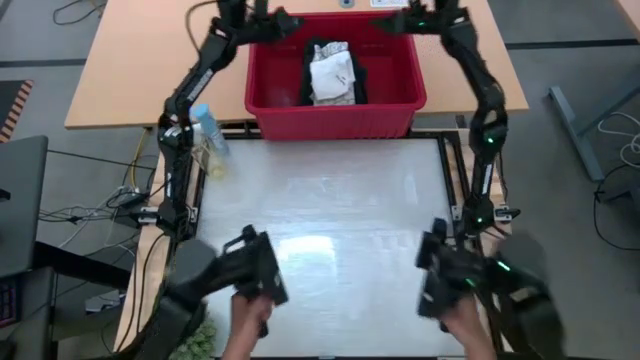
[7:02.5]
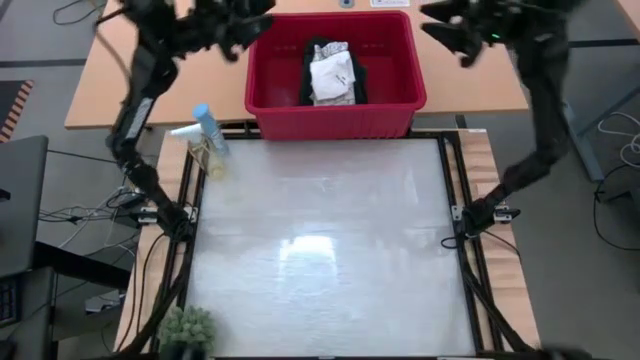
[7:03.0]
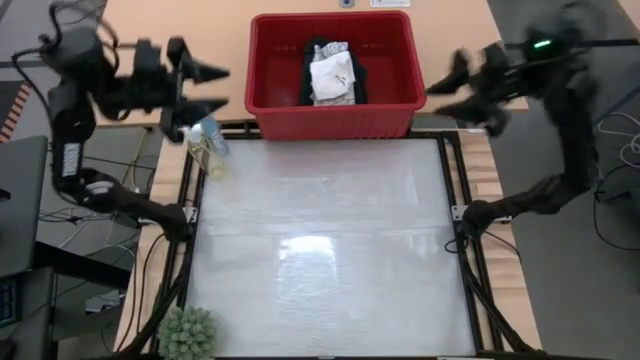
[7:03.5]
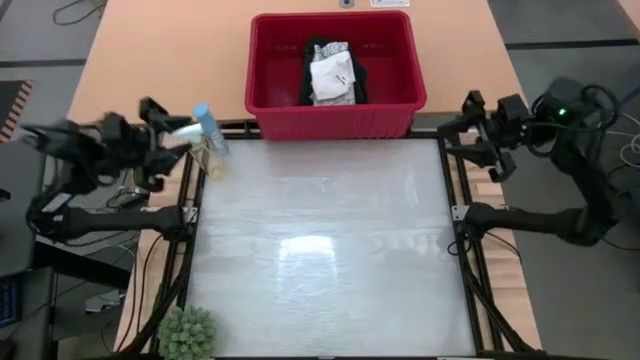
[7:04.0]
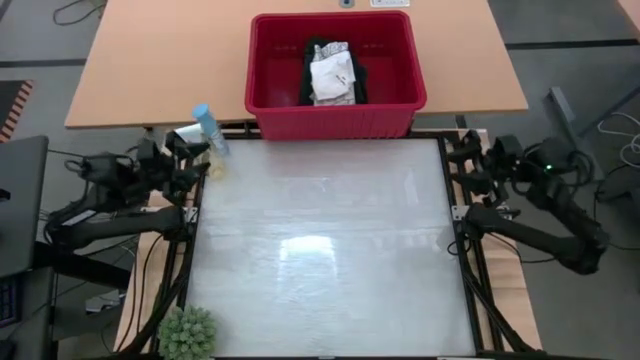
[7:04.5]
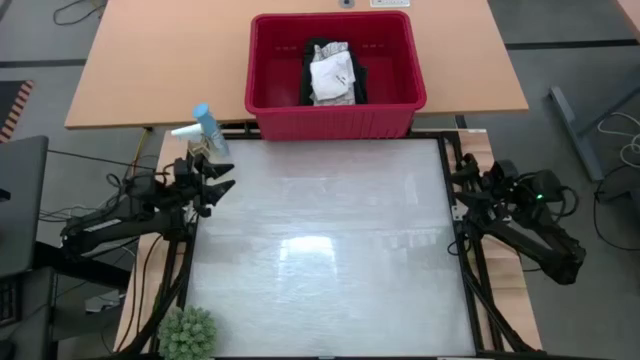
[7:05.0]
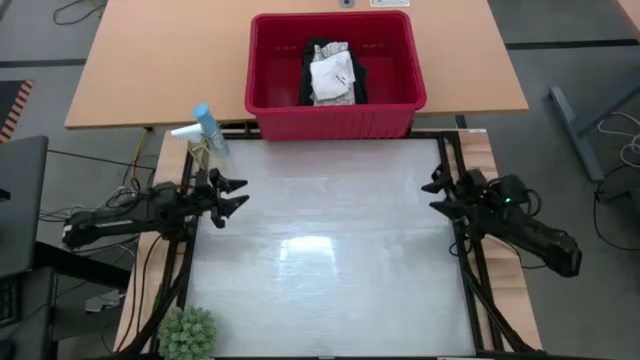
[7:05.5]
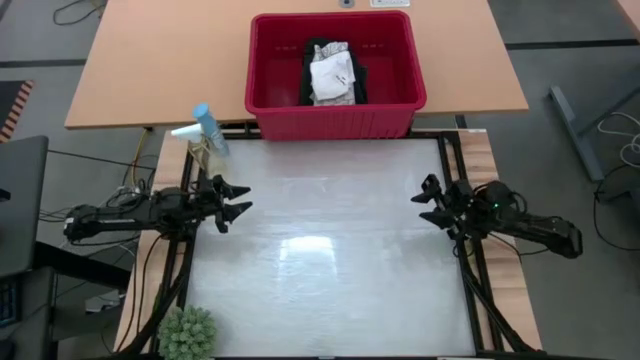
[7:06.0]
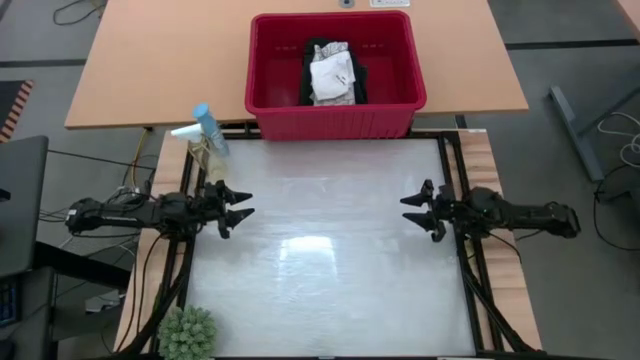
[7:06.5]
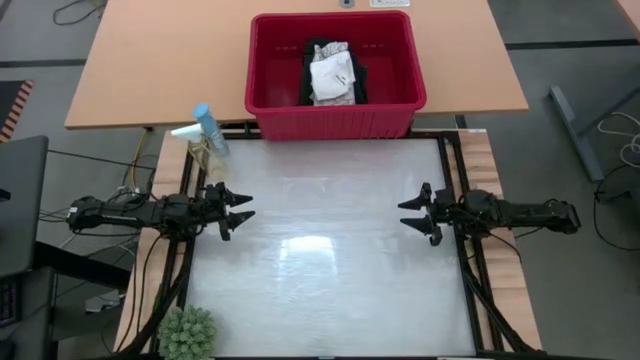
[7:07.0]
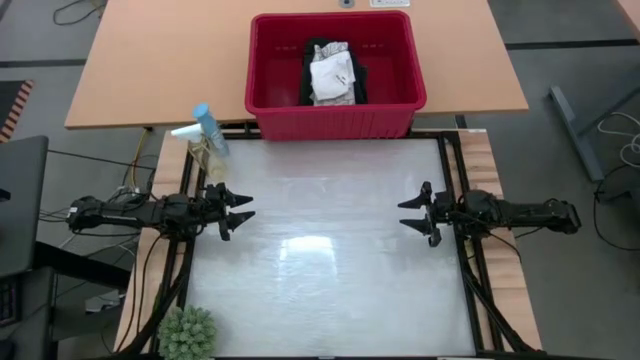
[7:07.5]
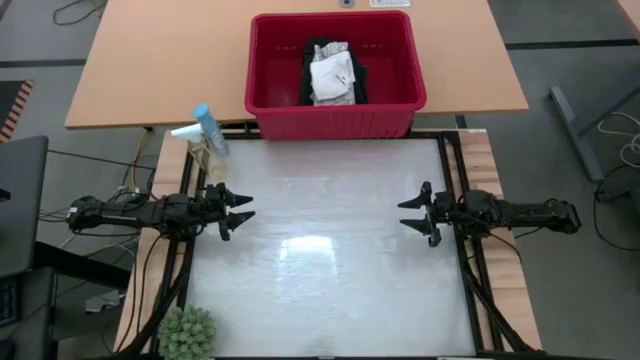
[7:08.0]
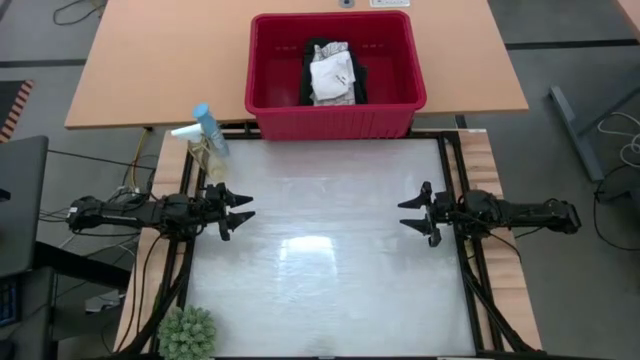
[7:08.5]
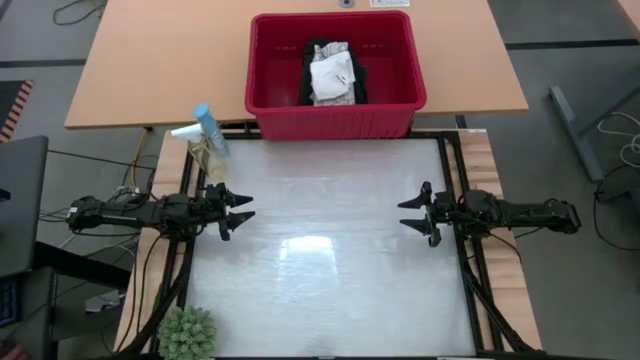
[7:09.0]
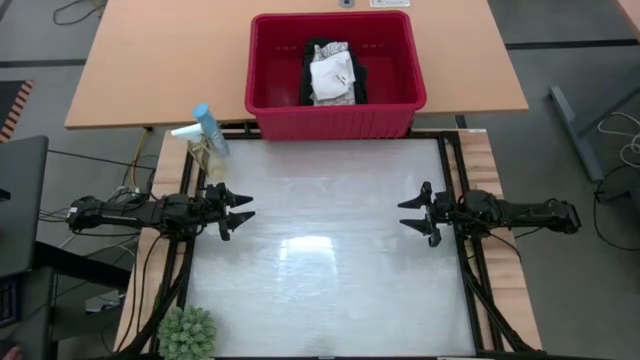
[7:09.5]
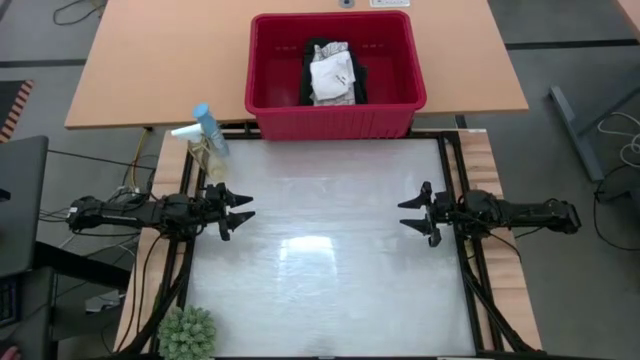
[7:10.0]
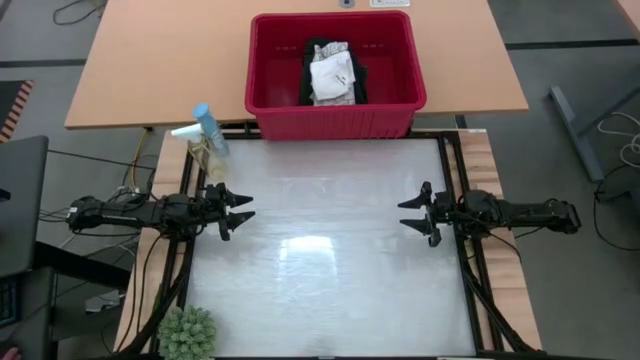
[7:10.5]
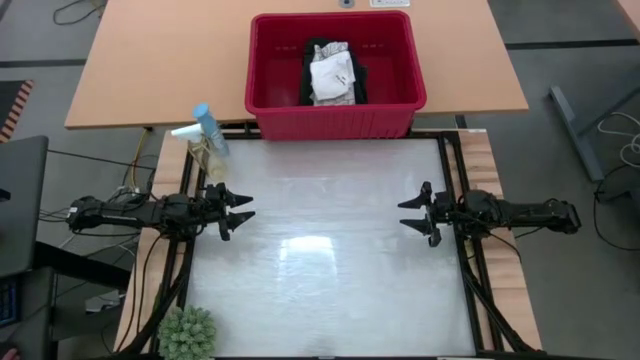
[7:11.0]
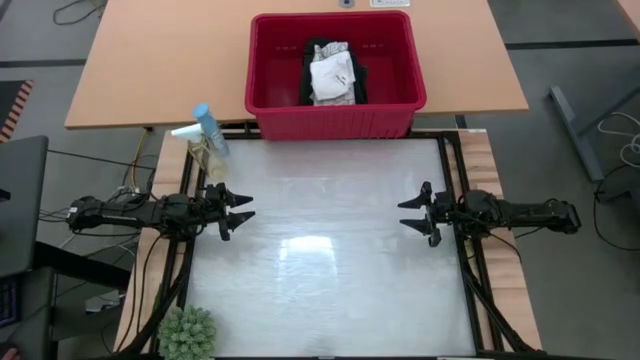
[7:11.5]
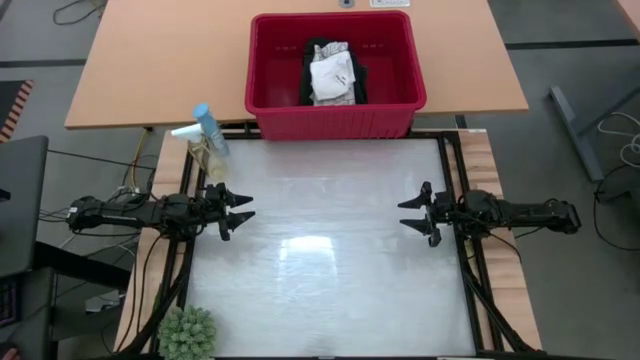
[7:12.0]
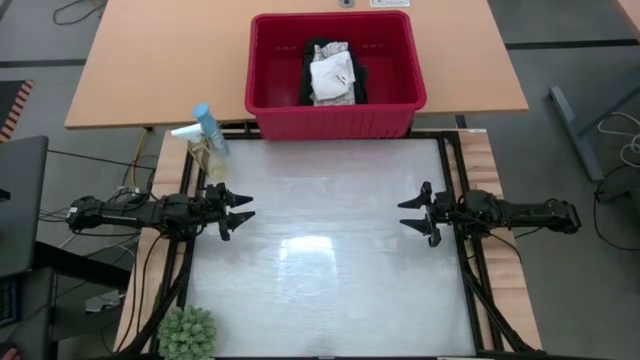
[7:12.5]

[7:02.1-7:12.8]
Task: Fold Laundry from Bin
Return to Home Position

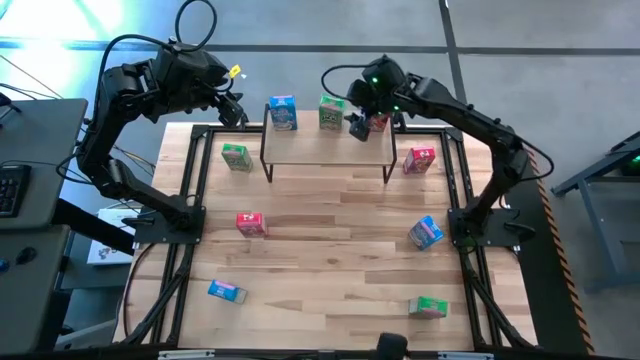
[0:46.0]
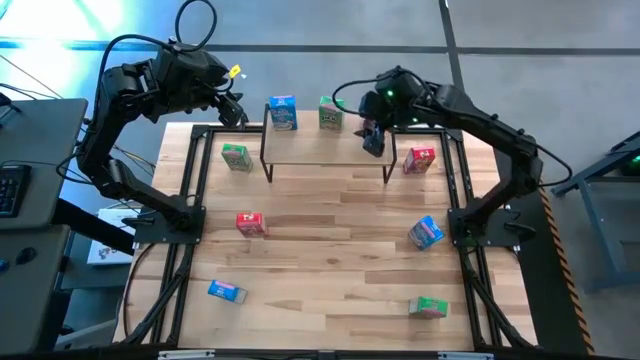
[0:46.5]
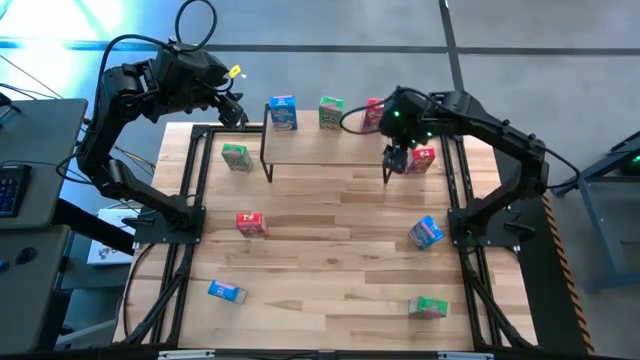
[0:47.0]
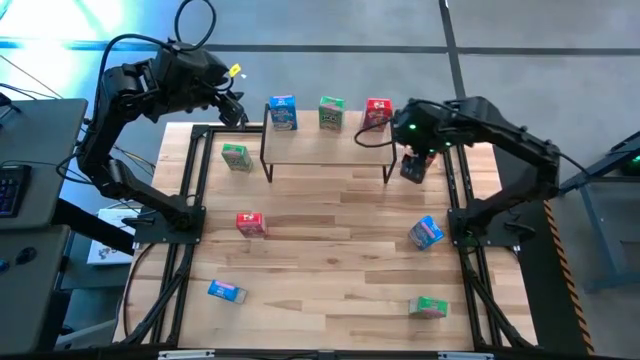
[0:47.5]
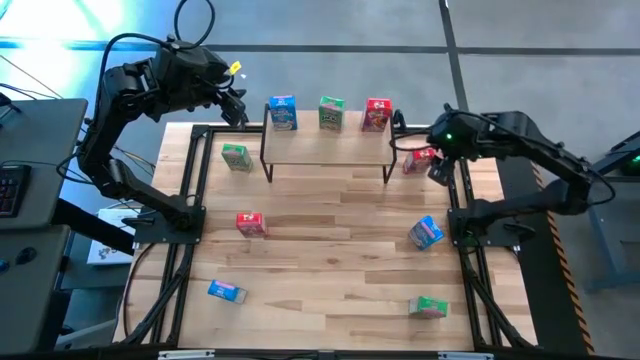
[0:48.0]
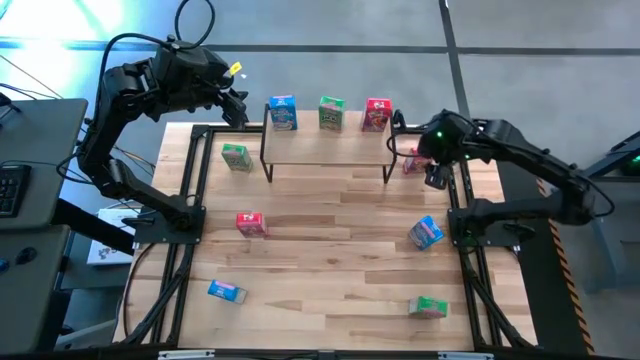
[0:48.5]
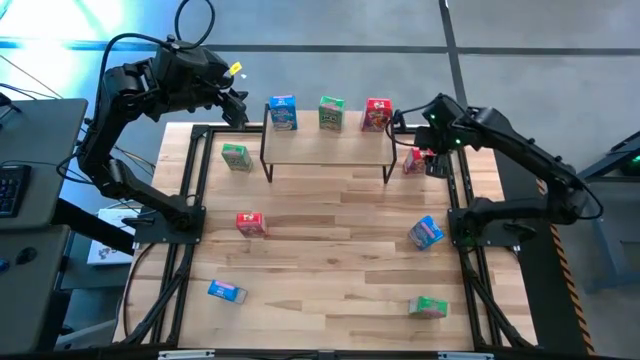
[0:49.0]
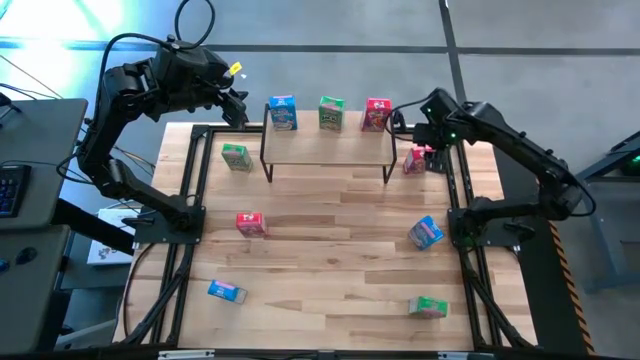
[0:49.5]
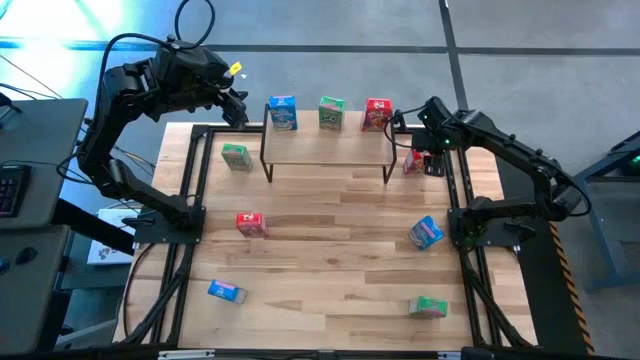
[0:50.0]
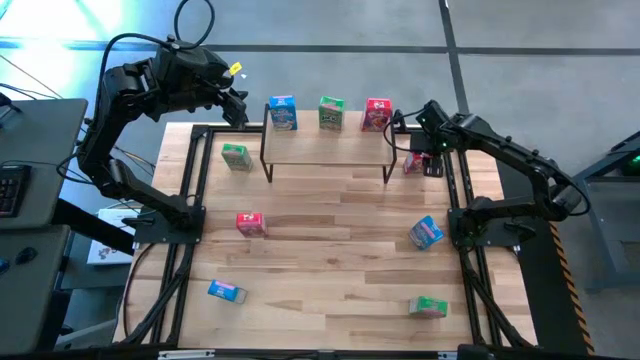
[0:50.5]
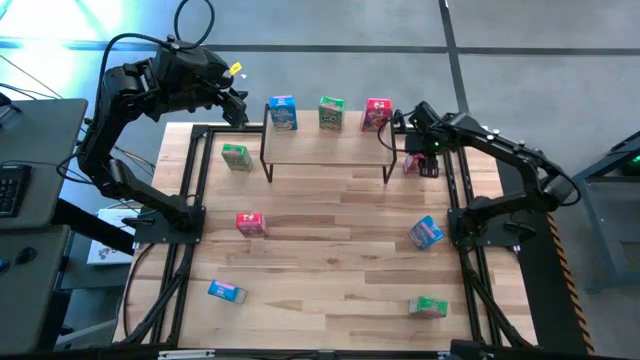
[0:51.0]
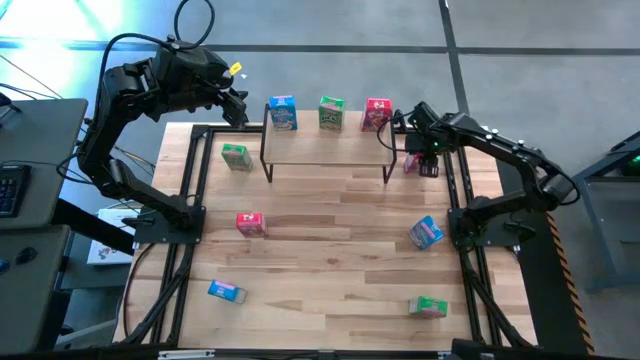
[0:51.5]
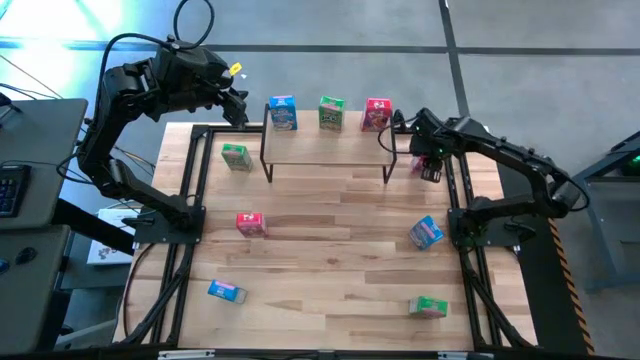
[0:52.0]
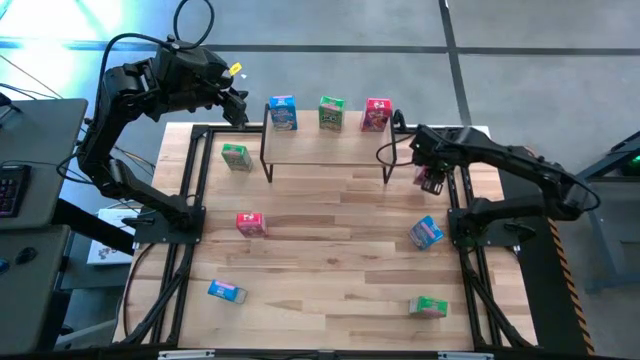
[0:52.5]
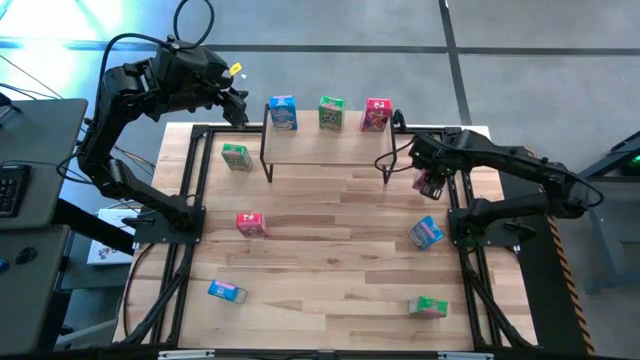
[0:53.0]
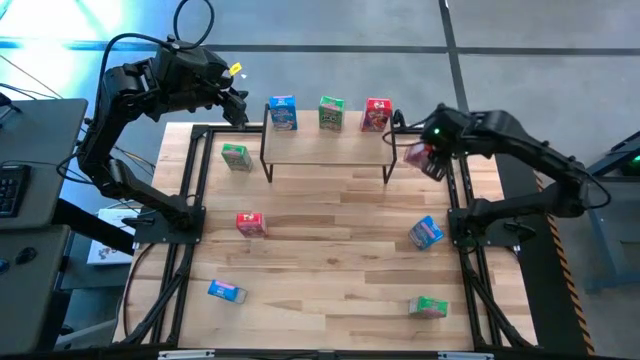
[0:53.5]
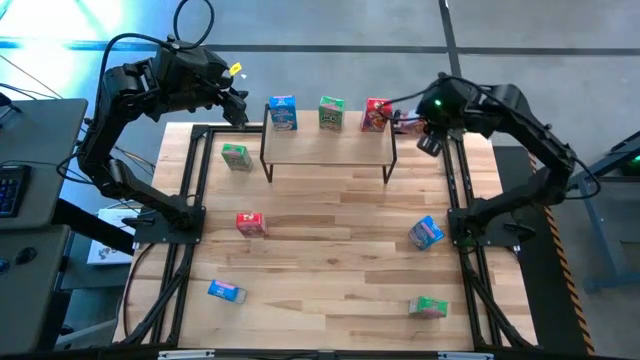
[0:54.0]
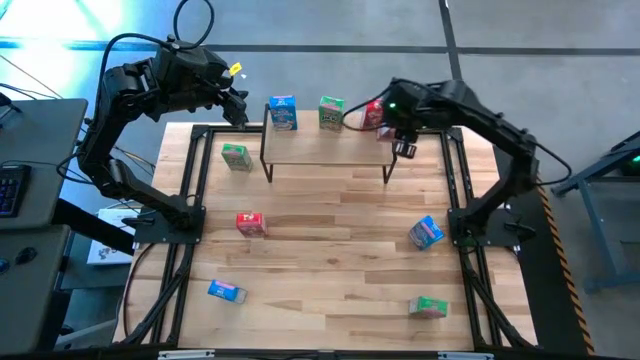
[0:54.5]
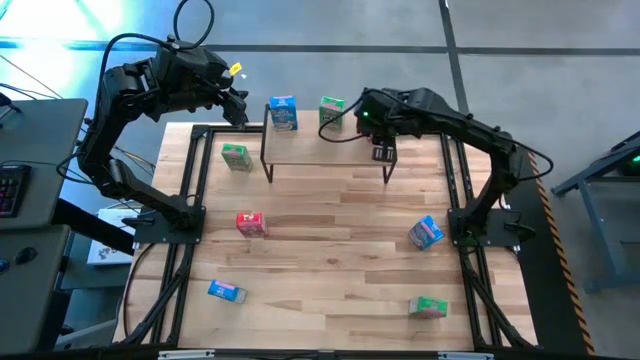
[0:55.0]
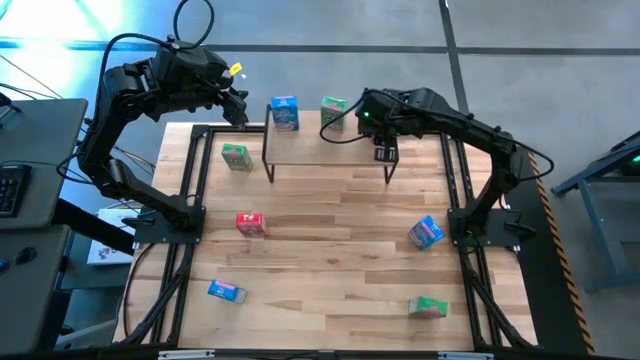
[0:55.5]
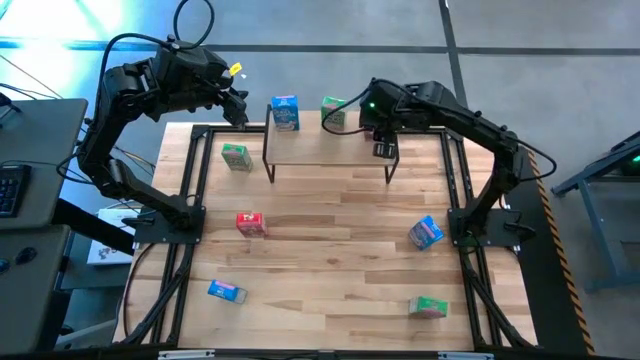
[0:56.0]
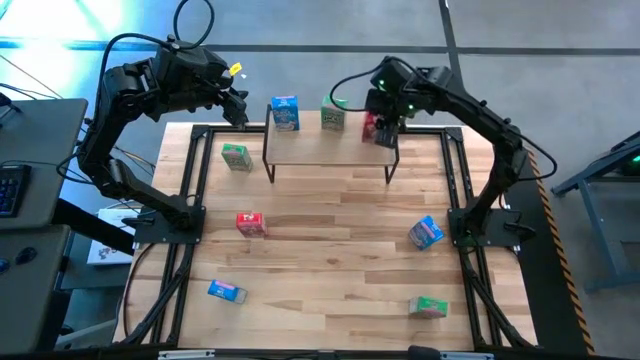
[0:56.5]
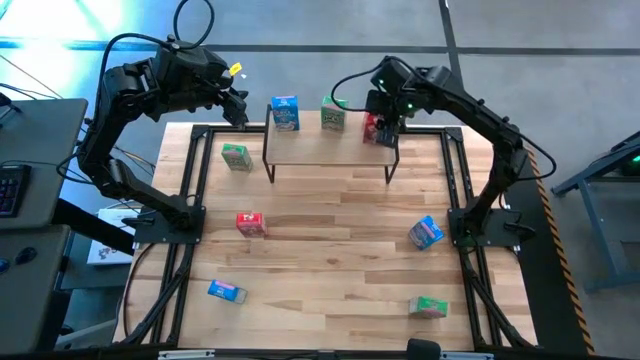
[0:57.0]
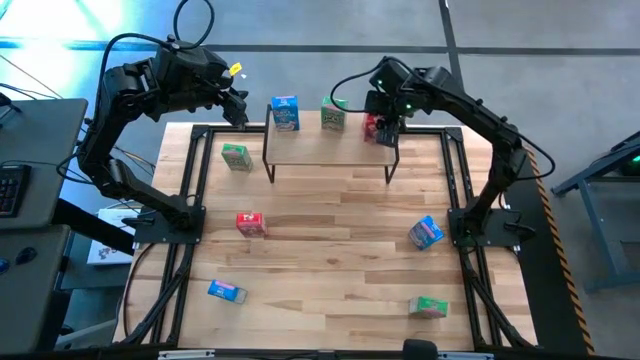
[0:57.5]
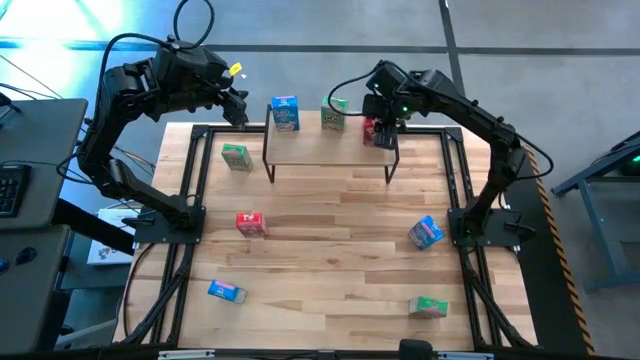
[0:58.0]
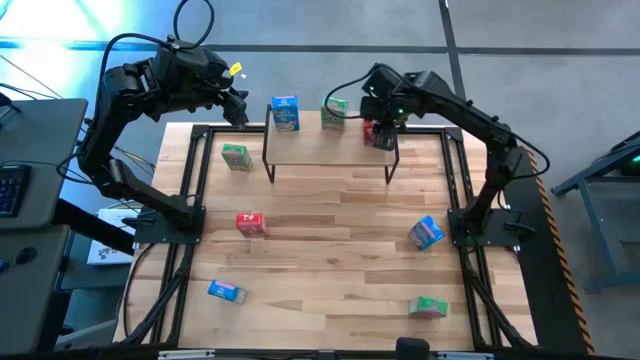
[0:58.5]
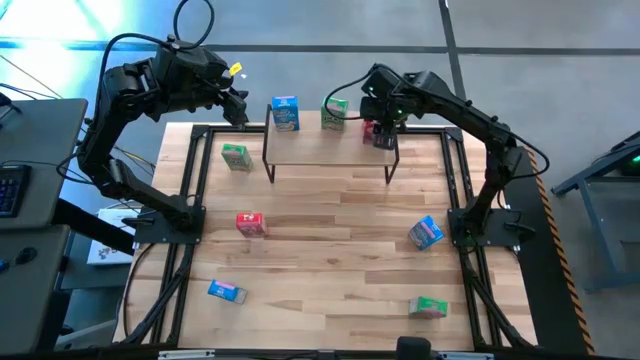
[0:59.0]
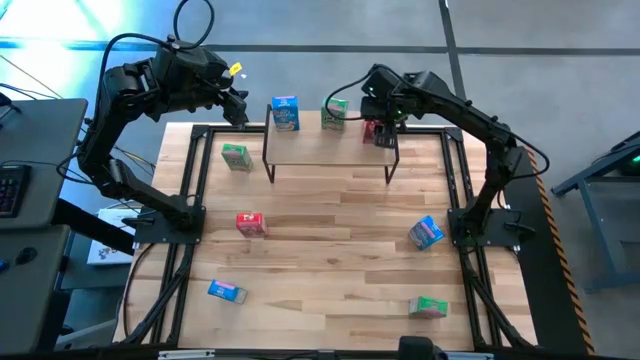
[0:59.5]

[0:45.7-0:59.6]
Task: Stack cereal on shelf
Put the top red cereal box aligned with the other red cereal box on the shelf
